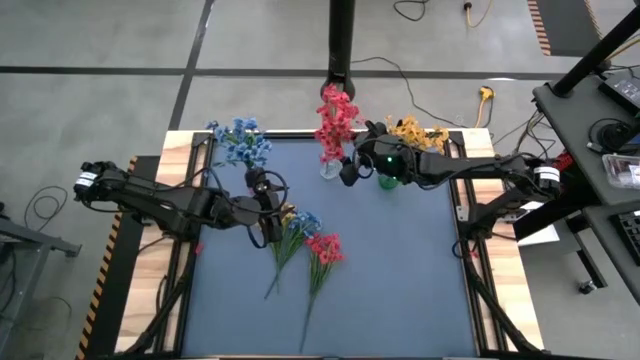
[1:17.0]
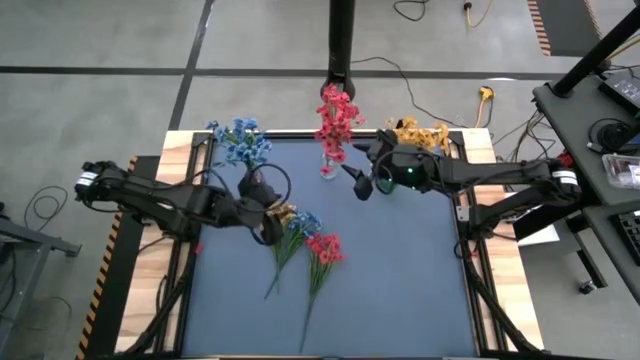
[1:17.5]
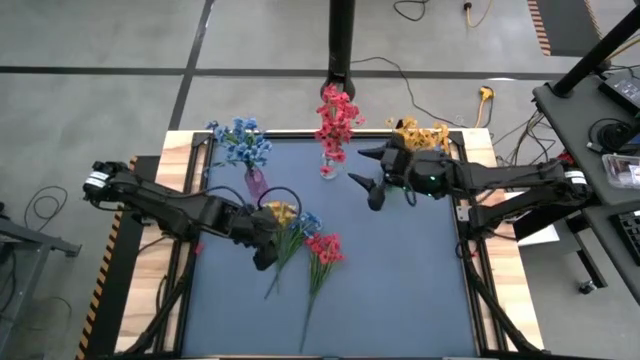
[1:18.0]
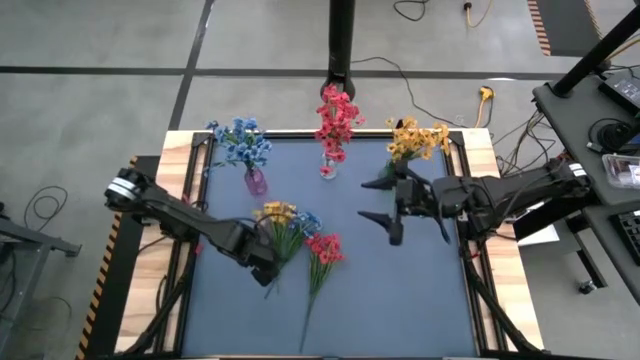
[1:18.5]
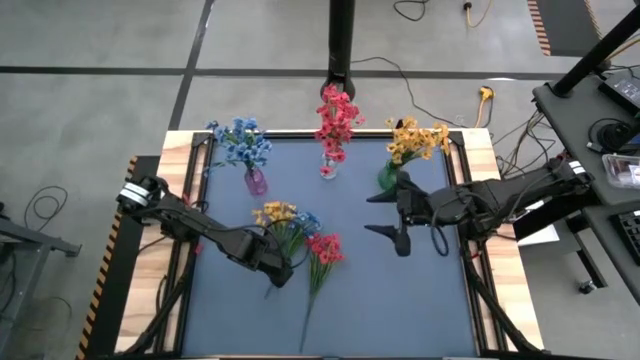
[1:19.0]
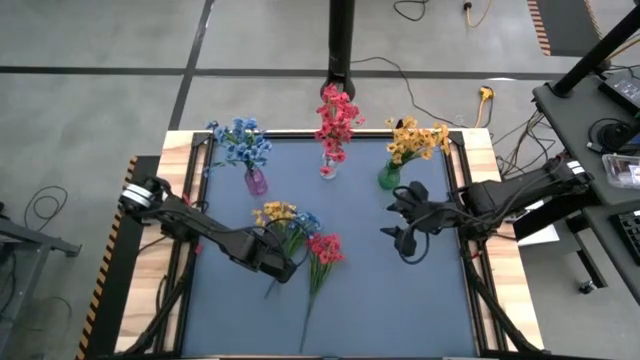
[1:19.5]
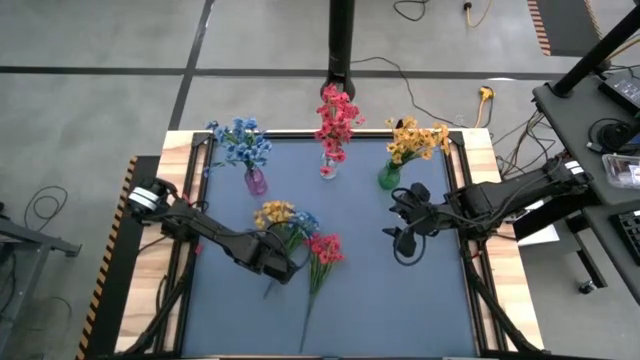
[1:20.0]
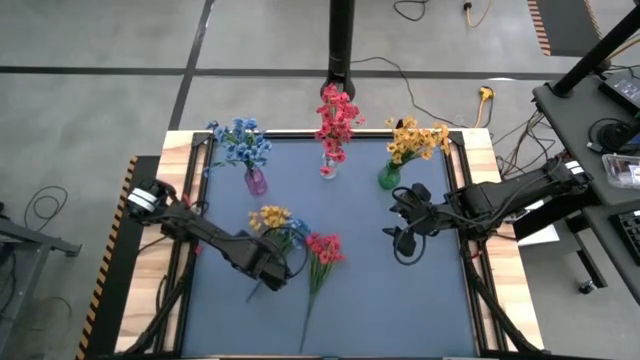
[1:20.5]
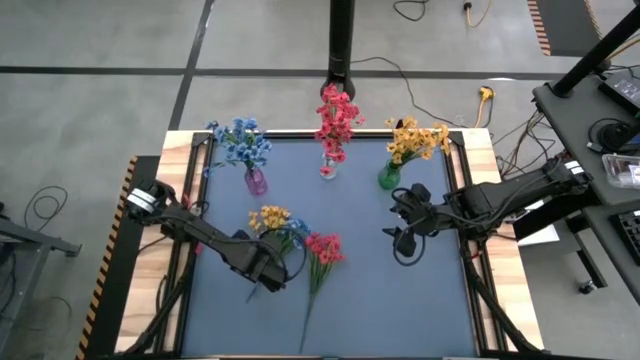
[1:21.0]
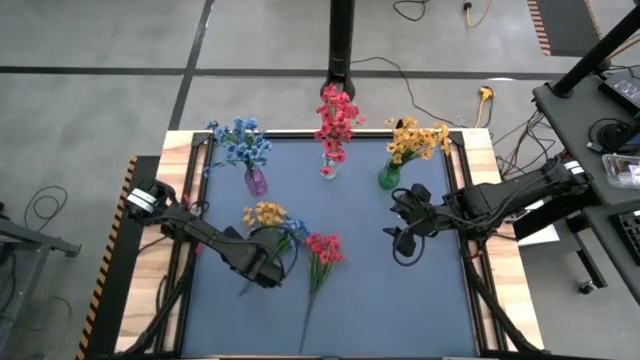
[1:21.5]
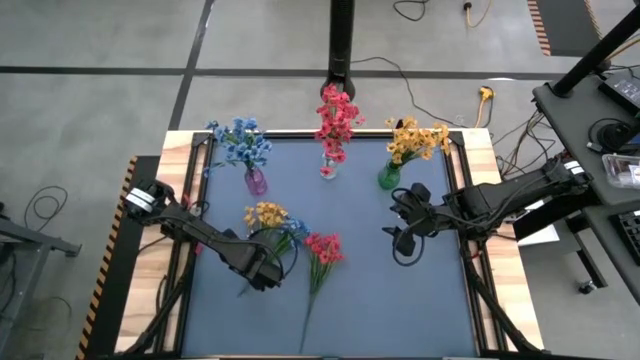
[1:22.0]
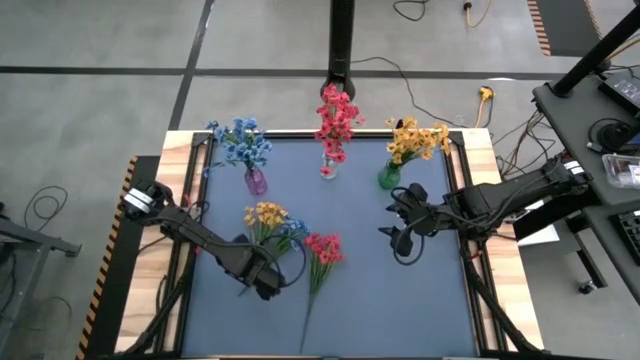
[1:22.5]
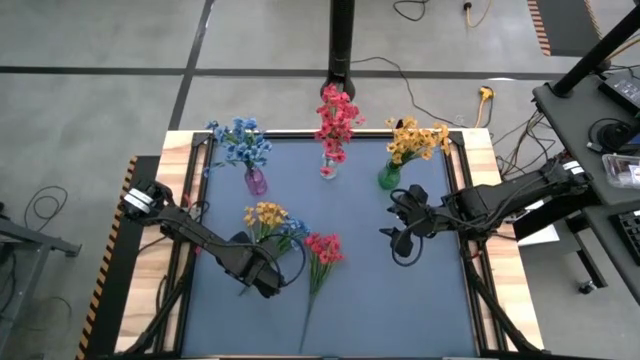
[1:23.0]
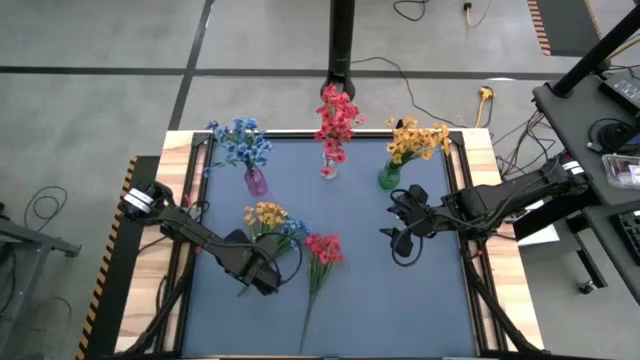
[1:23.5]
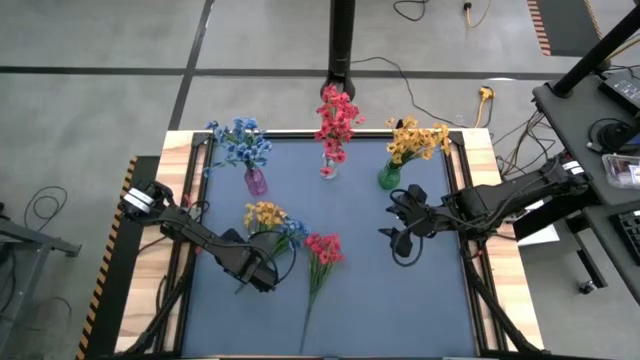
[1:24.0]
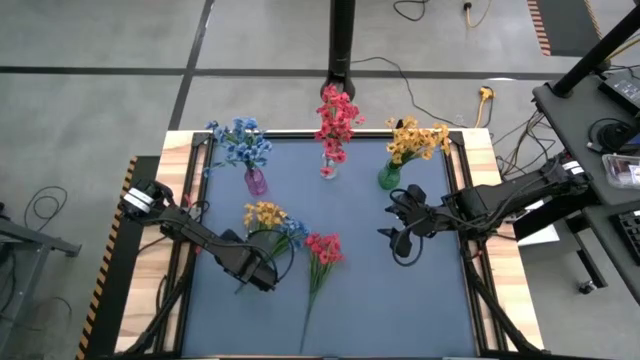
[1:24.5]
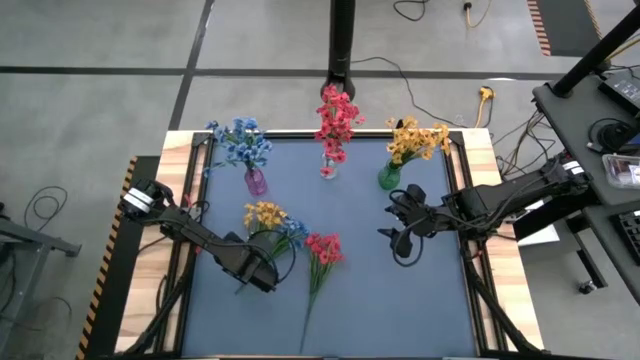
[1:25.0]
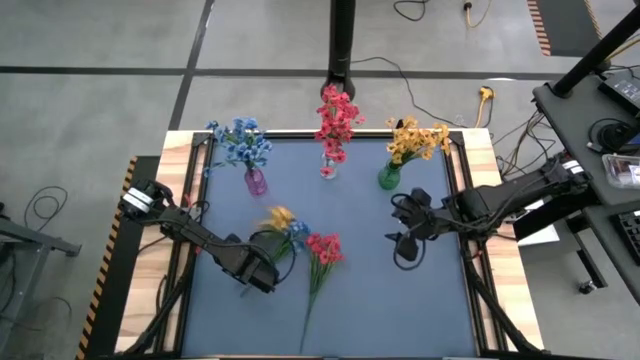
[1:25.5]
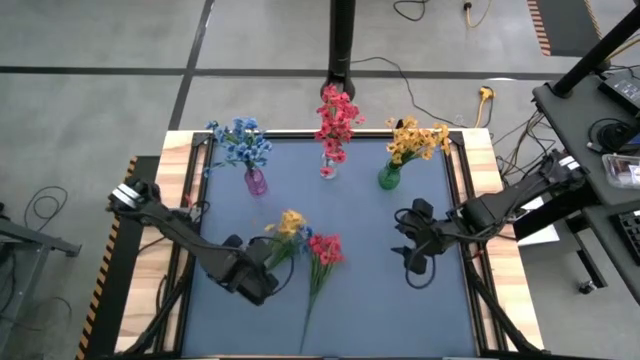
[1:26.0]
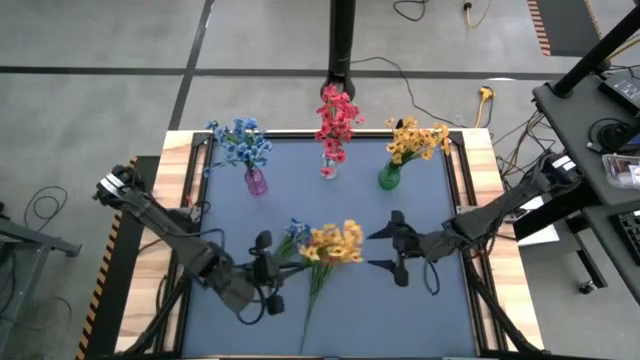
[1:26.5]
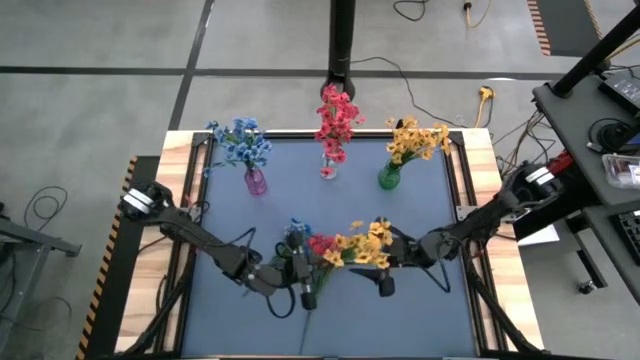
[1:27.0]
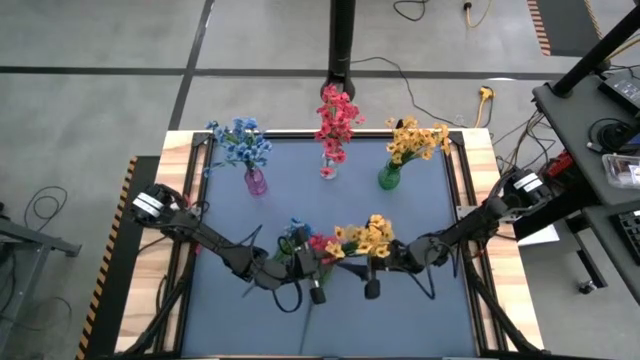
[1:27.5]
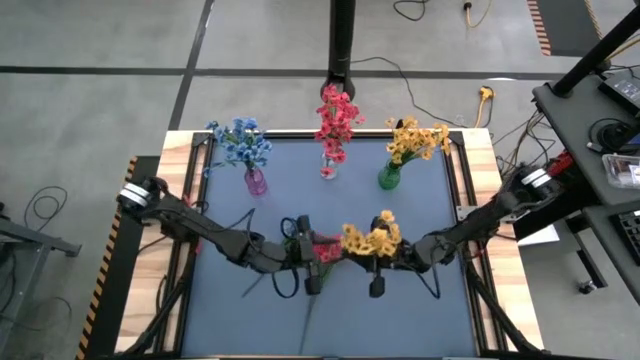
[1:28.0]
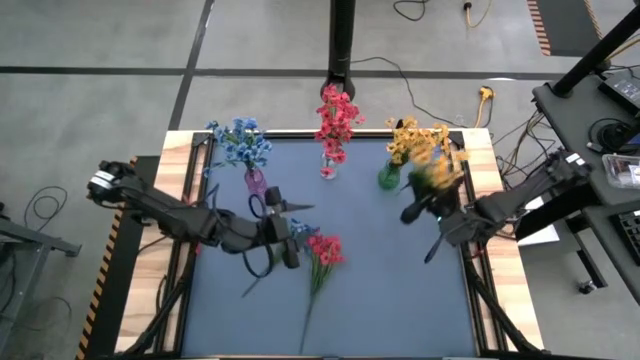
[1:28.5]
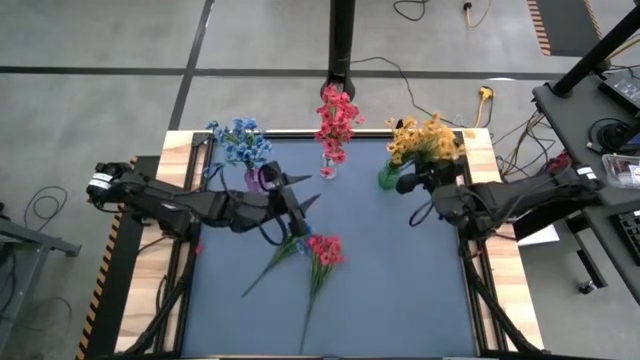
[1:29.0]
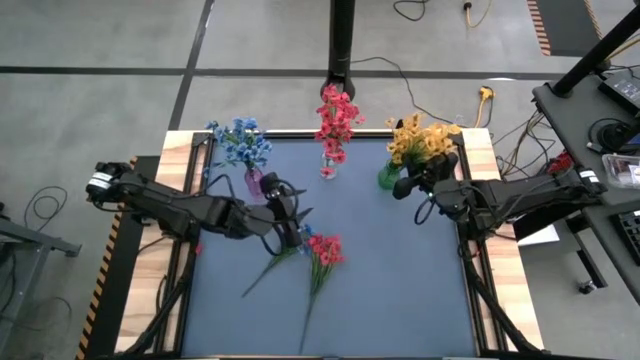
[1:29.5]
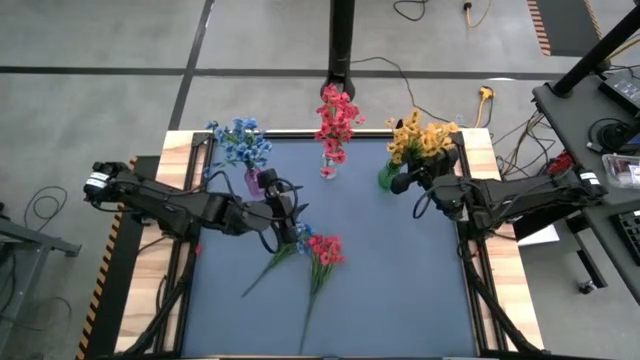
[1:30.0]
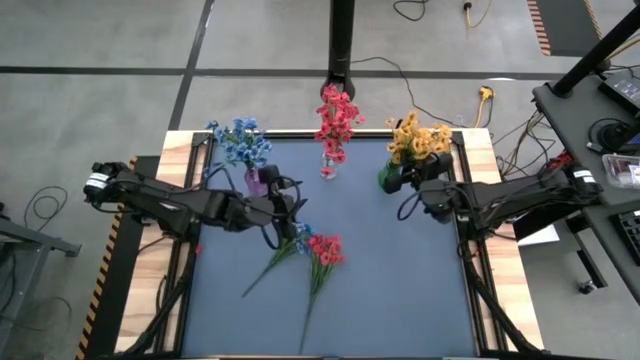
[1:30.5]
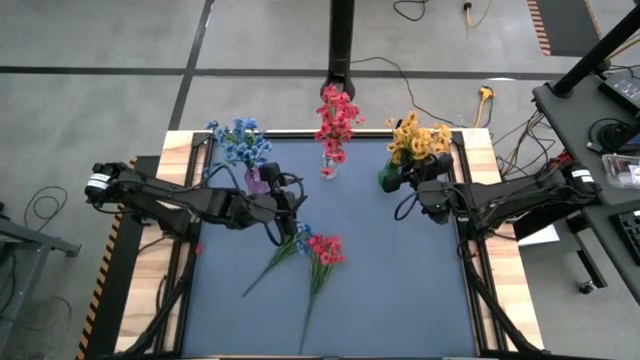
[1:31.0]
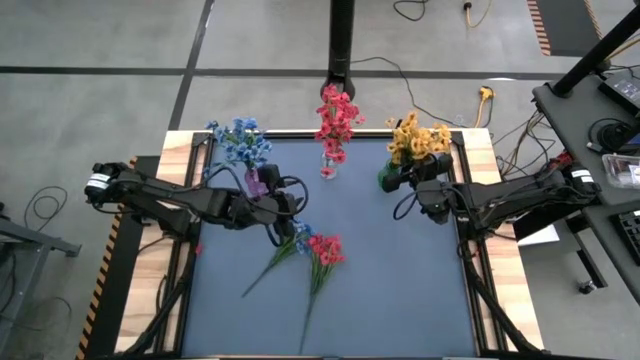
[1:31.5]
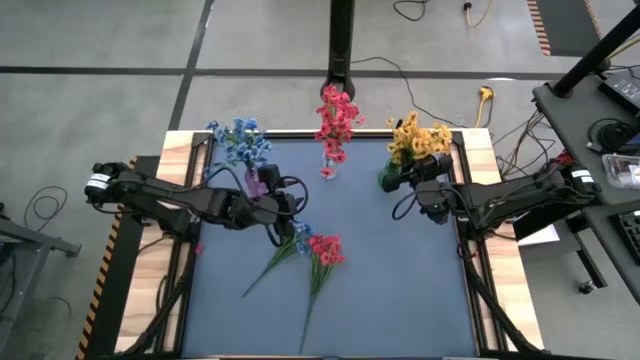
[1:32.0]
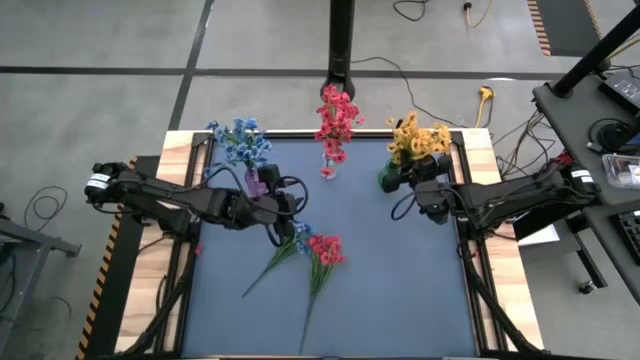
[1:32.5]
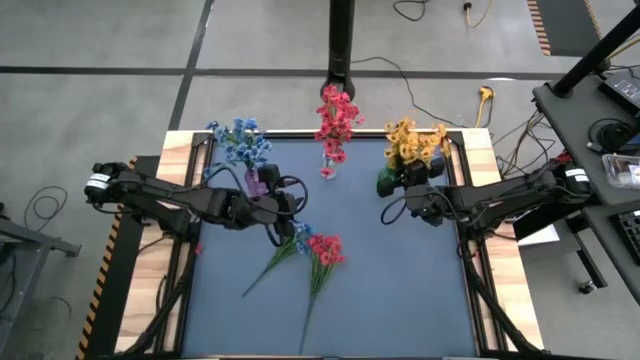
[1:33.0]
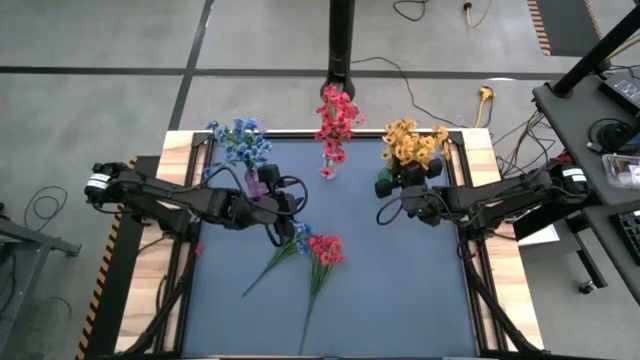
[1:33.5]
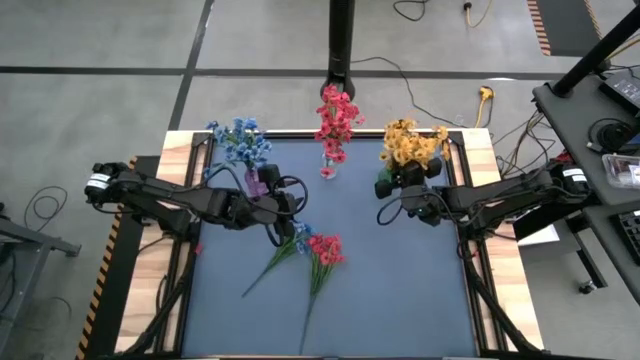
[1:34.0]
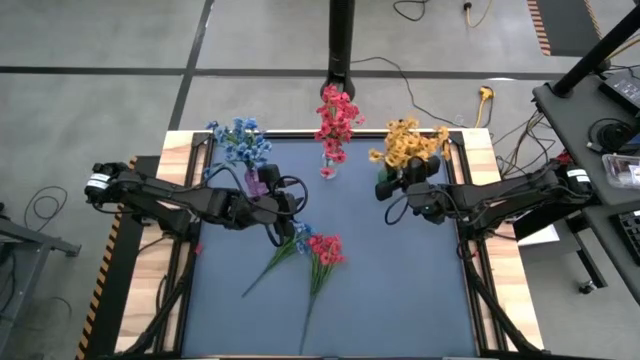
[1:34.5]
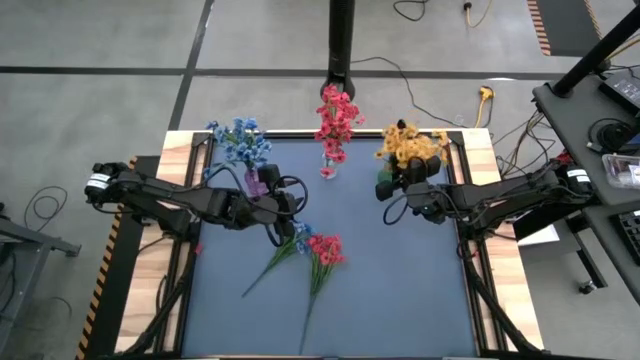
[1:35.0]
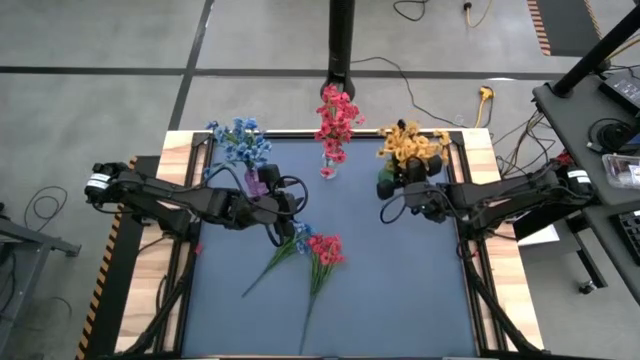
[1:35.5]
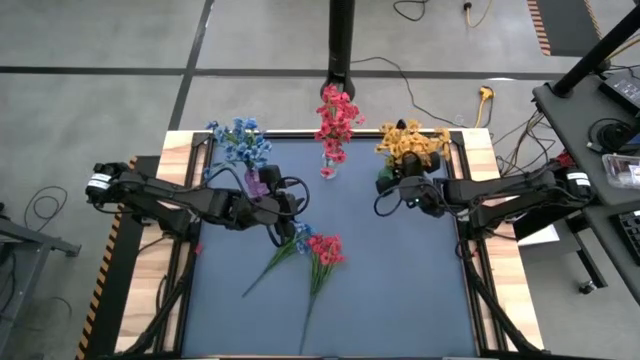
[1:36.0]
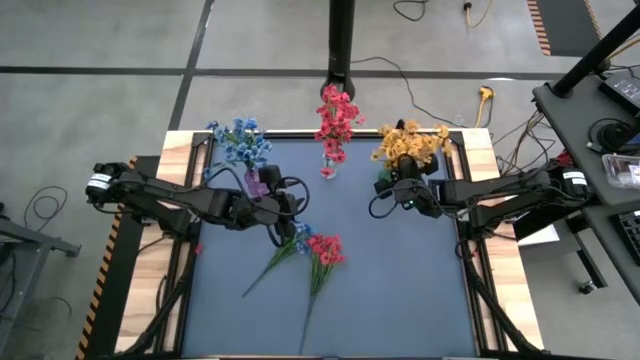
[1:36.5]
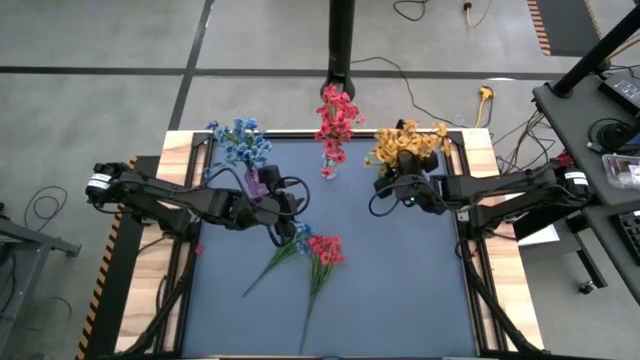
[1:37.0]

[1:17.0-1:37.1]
Task: Sort flowers into vase by color
Put the yellow flower into the green vase

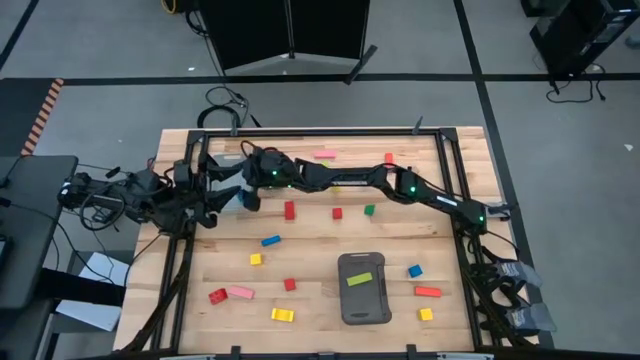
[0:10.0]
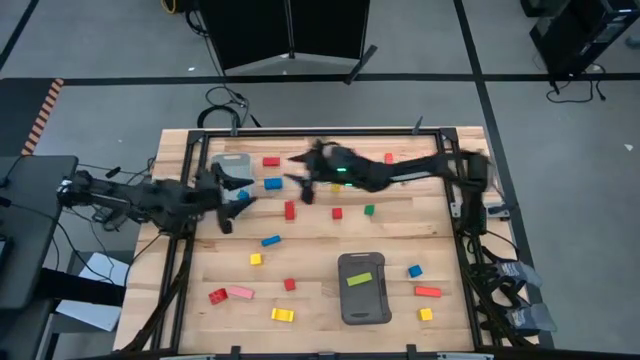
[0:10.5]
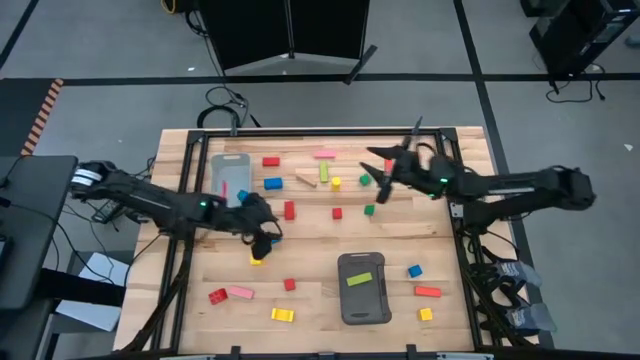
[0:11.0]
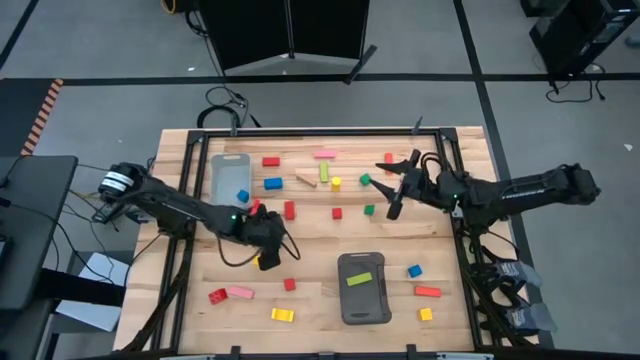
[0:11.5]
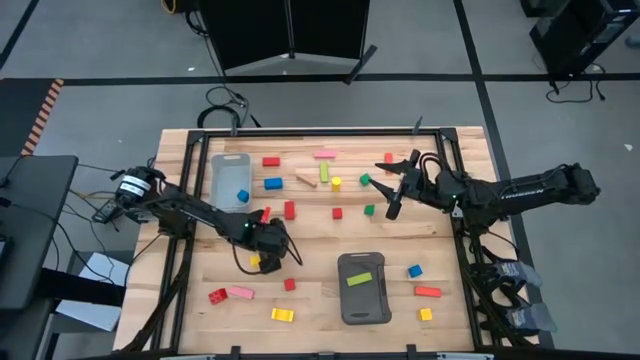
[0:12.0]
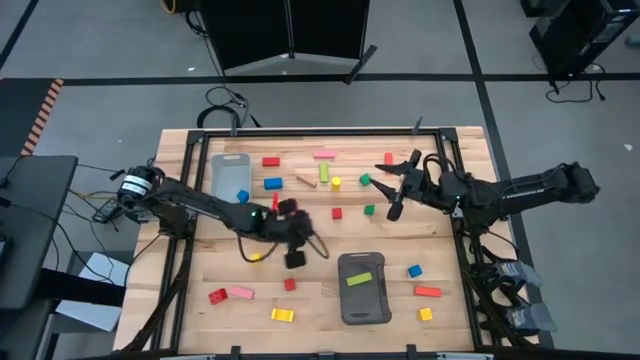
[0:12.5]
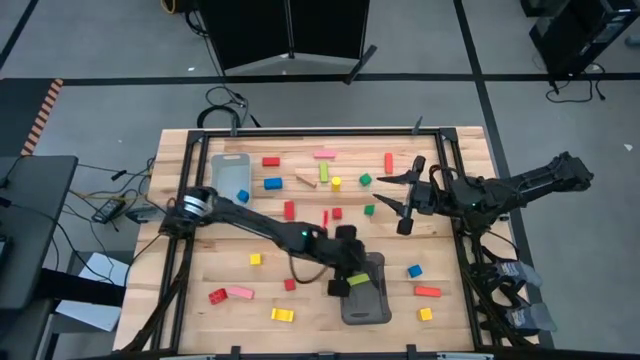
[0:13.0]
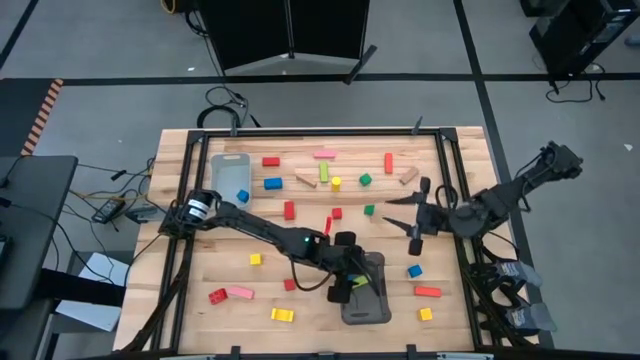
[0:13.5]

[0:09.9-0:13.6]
Task: Sort blocks by size
Put the blue rectangular block into the black bin
